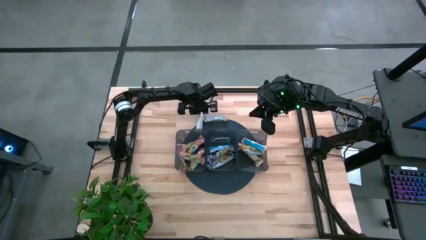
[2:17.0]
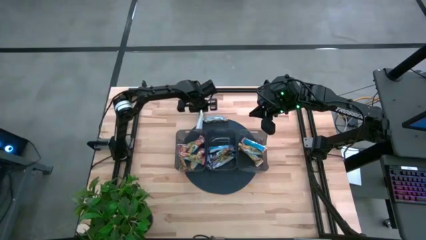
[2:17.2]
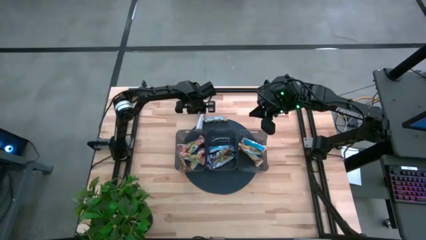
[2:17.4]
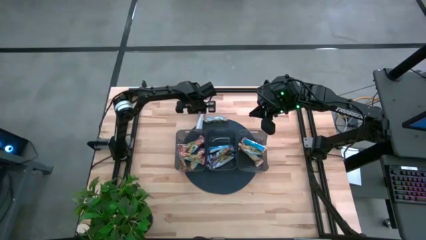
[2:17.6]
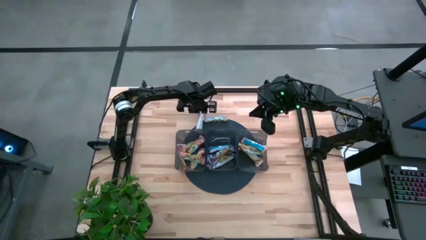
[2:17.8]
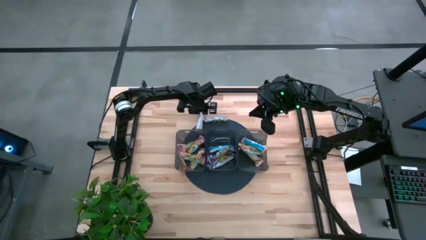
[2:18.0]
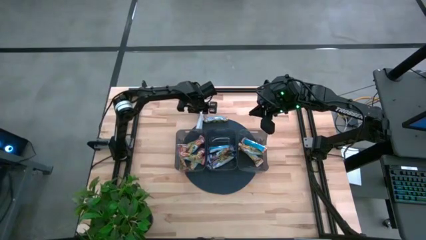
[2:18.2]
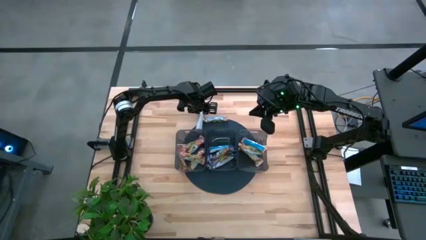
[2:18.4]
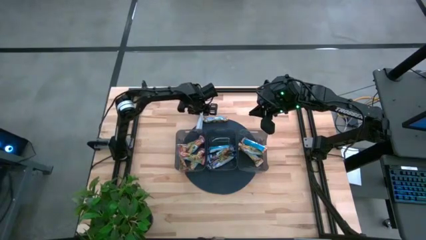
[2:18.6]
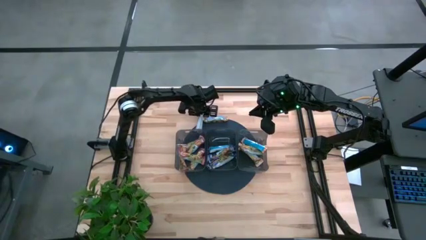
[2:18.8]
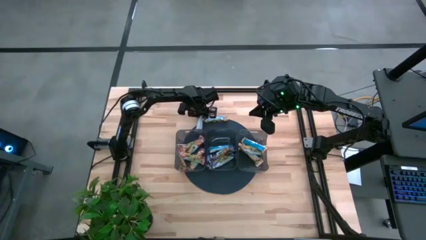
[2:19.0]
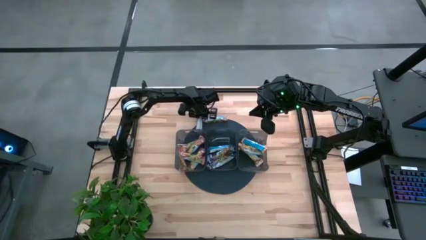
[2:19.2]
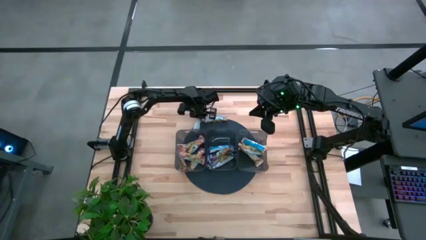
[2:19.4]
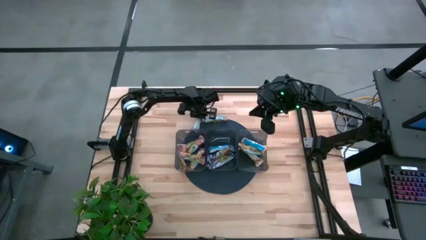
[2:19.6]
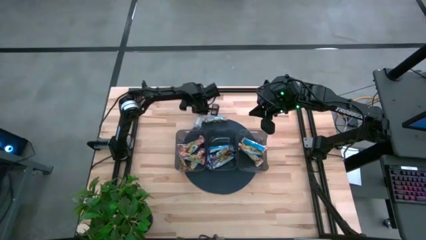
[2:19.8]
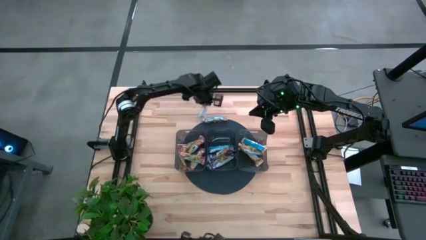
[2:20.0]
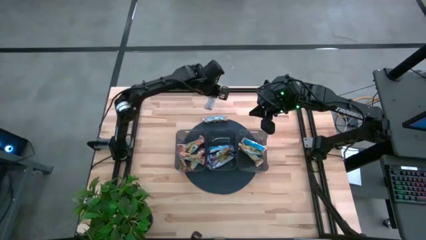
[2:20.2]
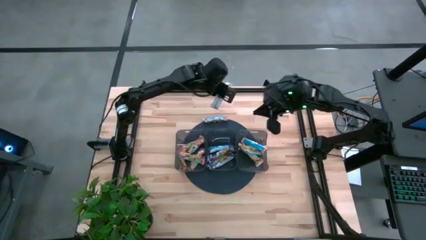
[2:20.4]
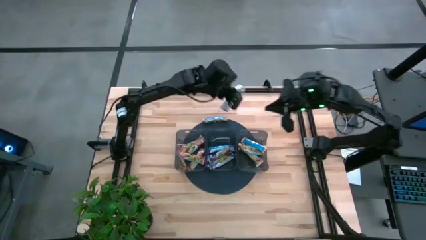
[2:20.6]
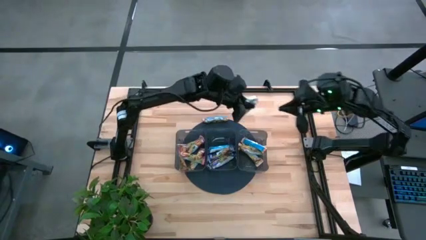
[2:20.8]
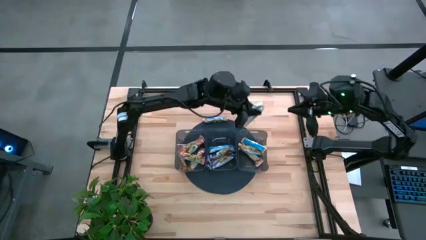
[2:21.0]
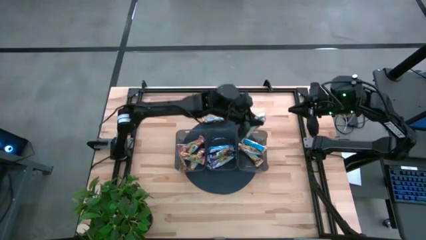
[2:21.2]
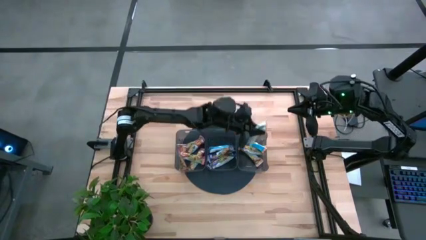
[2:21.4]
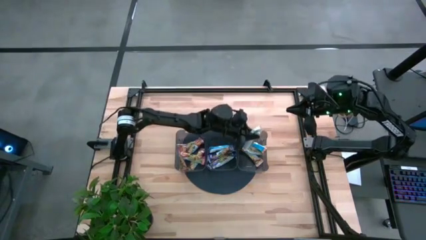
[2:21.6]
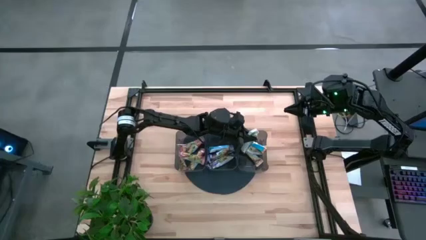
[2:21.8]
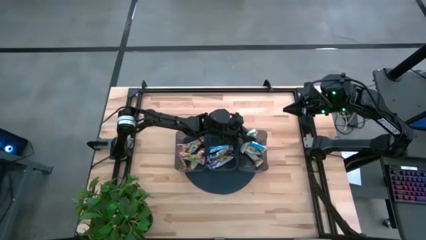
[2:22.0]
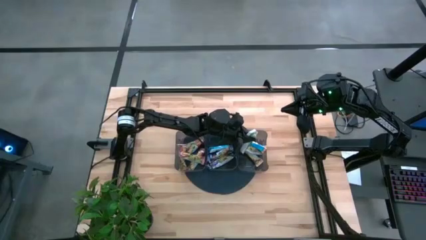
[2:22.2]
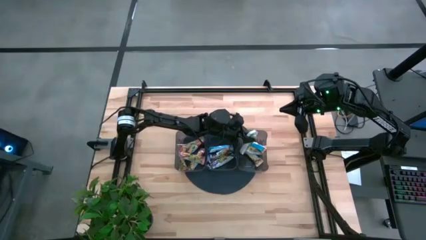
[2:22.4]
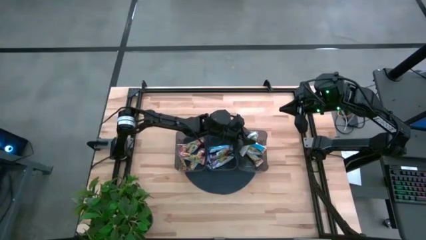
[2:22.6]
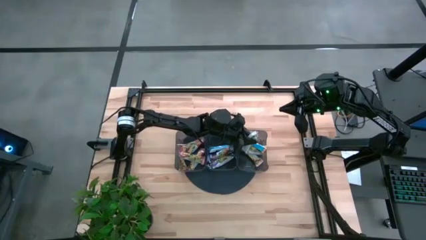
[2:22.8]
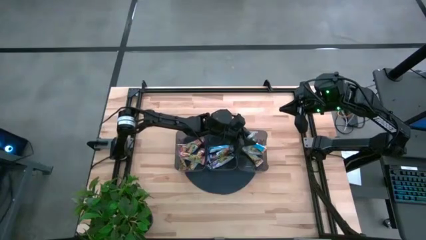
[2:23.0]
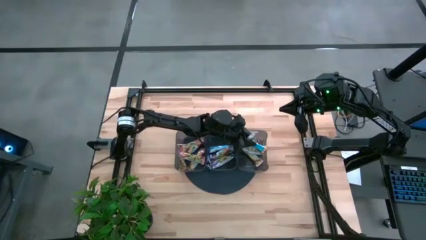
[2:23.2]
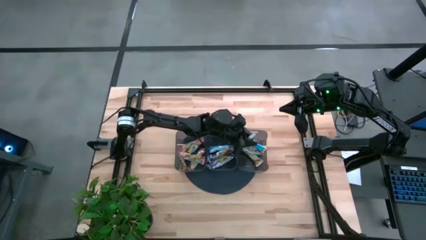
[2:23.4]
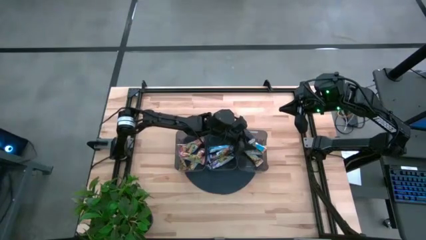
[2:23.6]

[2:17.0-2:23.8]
Task: Pick and place Granola Bars by type
Put the yellow granola bar into the right black bin

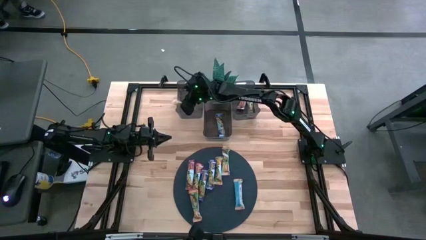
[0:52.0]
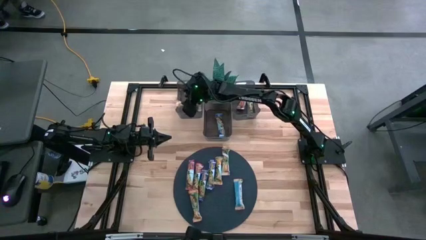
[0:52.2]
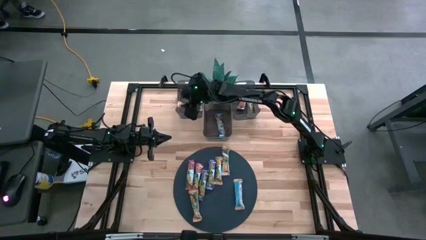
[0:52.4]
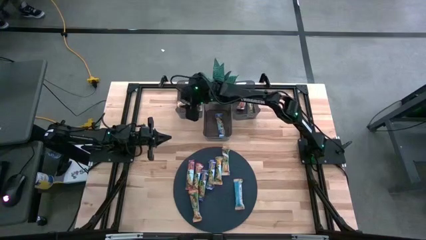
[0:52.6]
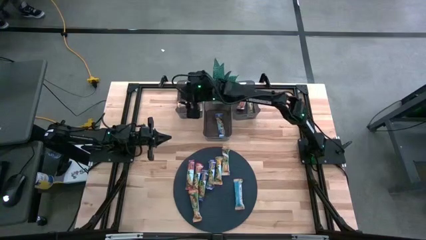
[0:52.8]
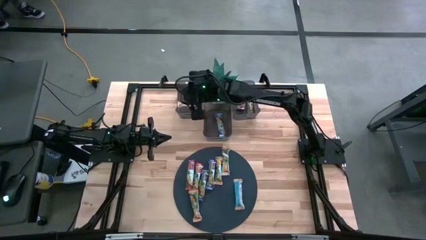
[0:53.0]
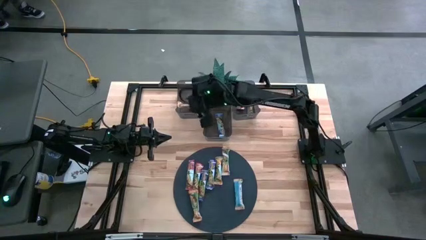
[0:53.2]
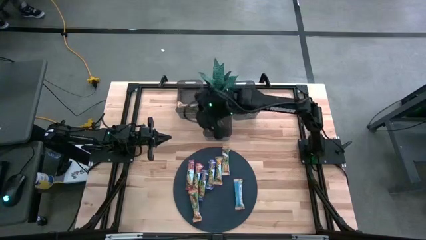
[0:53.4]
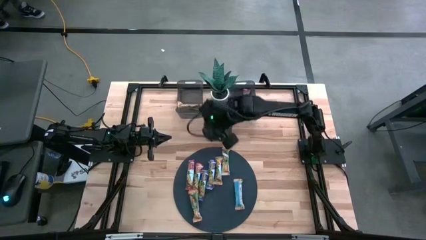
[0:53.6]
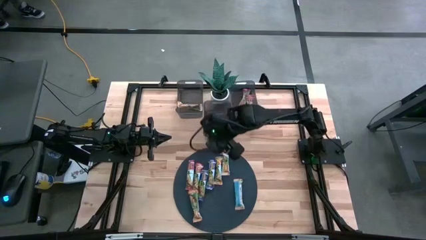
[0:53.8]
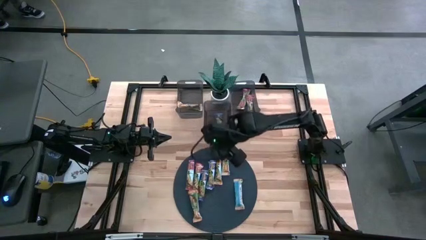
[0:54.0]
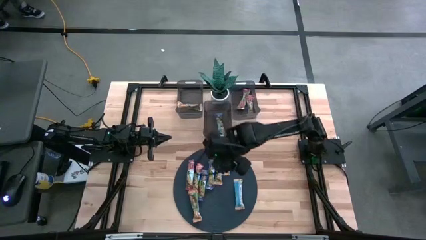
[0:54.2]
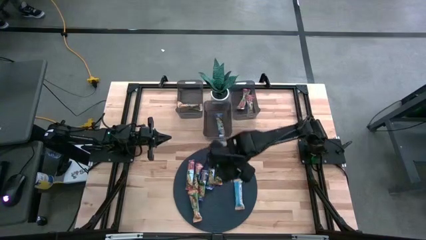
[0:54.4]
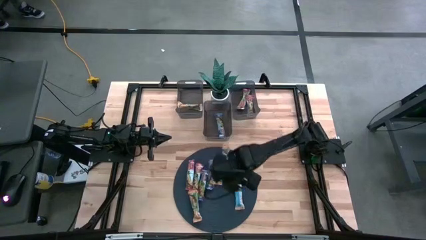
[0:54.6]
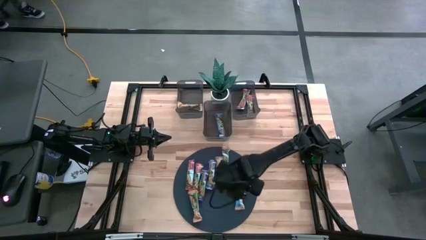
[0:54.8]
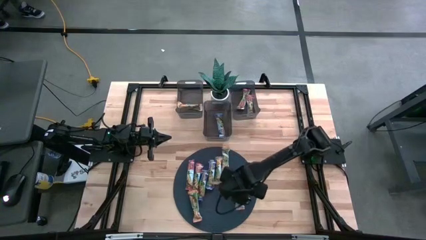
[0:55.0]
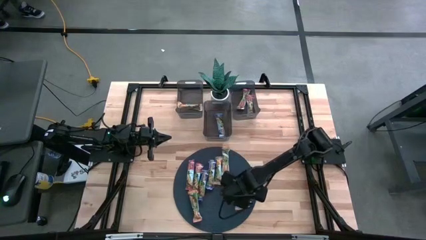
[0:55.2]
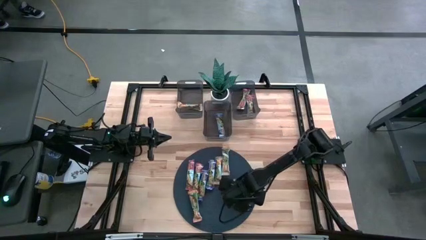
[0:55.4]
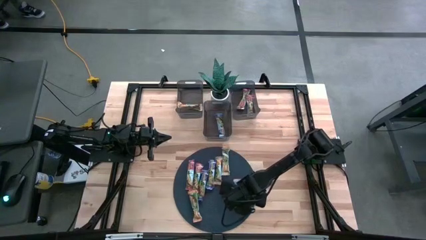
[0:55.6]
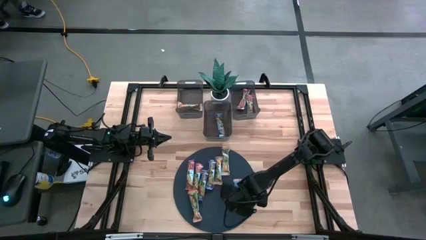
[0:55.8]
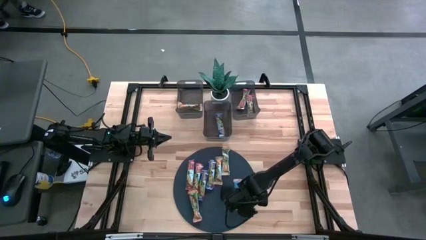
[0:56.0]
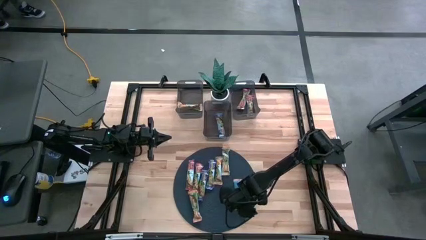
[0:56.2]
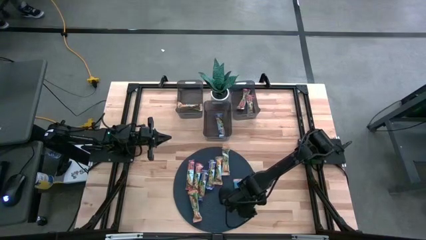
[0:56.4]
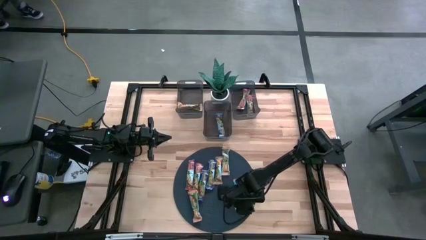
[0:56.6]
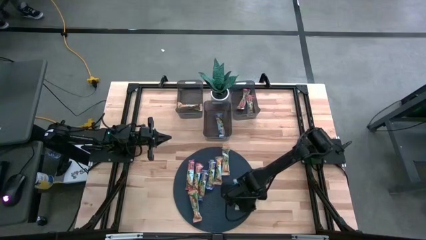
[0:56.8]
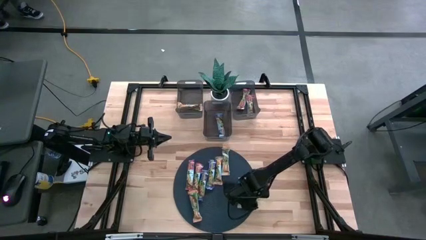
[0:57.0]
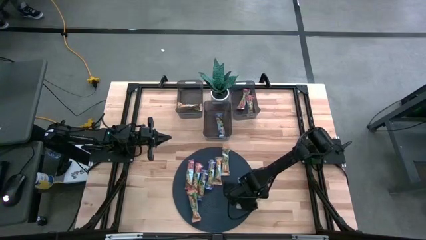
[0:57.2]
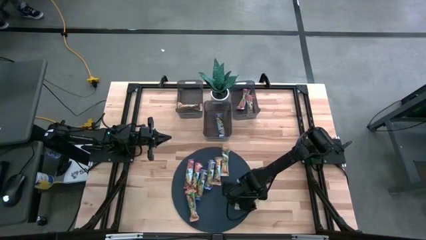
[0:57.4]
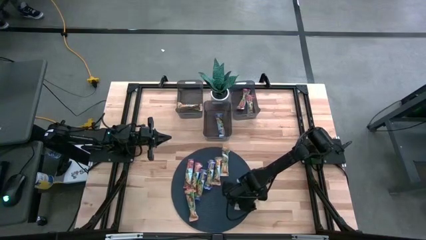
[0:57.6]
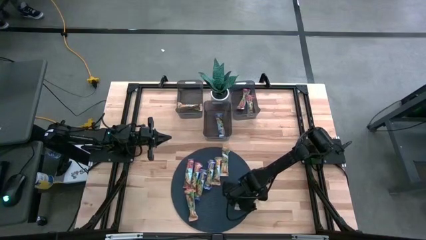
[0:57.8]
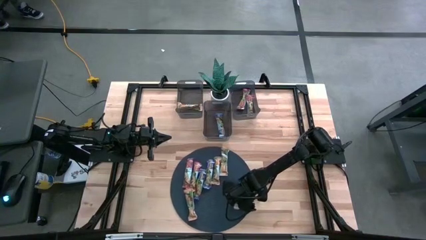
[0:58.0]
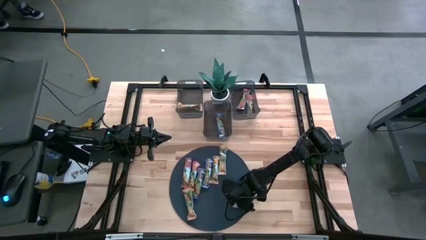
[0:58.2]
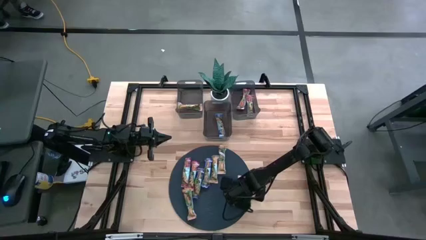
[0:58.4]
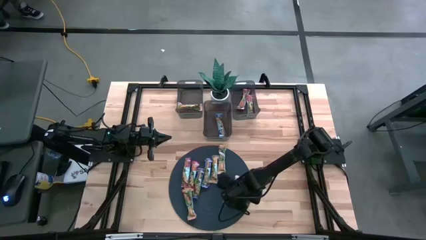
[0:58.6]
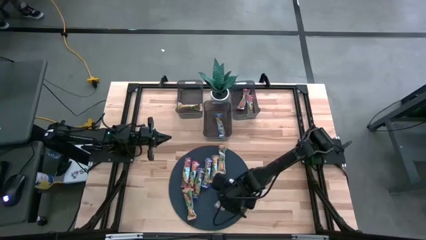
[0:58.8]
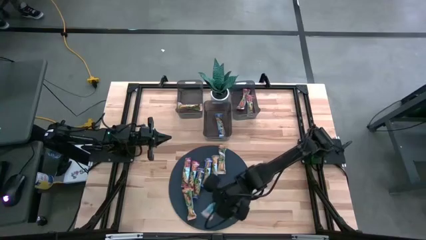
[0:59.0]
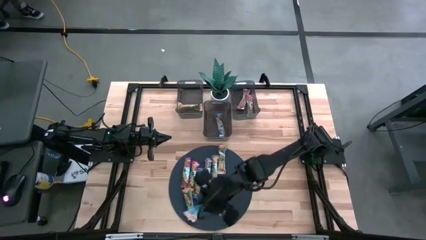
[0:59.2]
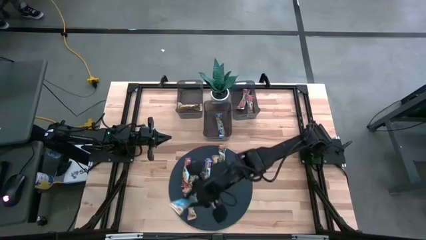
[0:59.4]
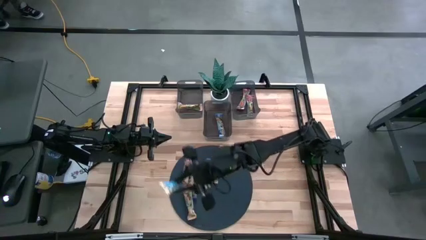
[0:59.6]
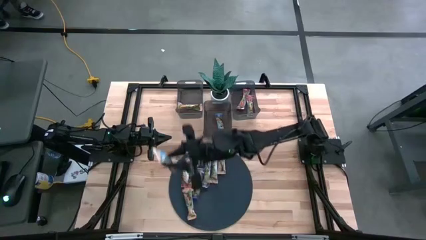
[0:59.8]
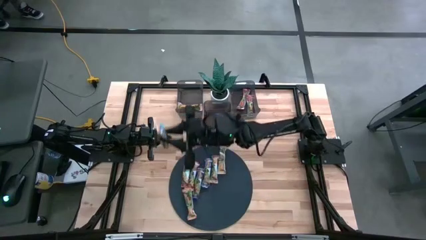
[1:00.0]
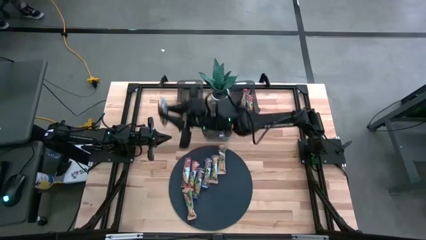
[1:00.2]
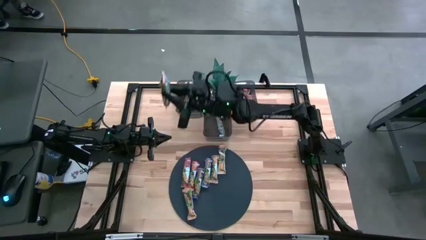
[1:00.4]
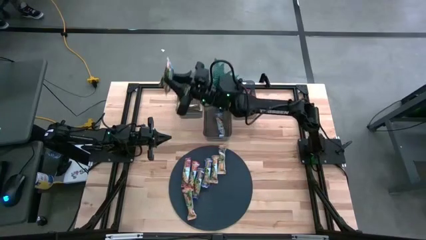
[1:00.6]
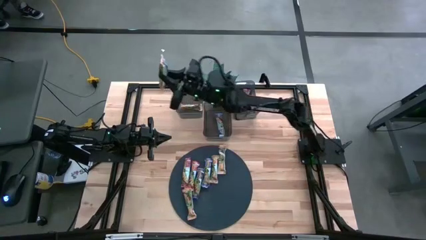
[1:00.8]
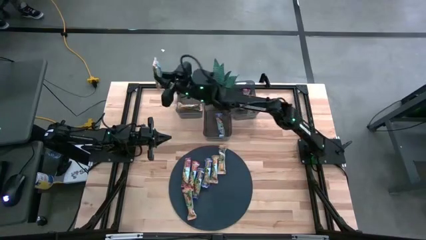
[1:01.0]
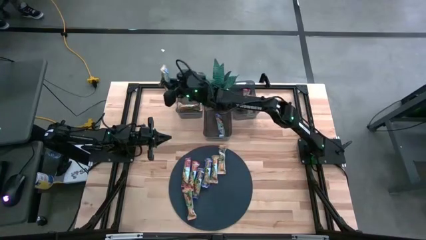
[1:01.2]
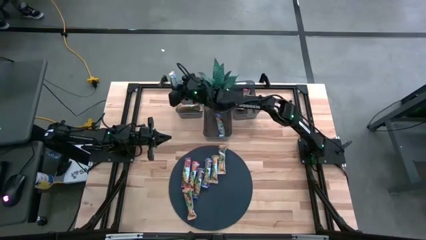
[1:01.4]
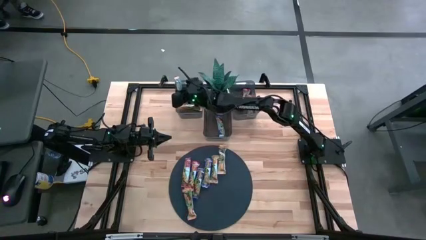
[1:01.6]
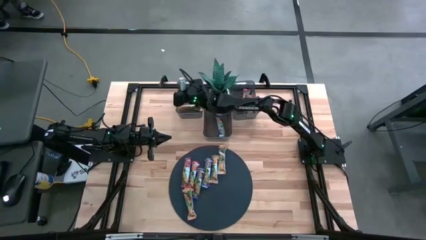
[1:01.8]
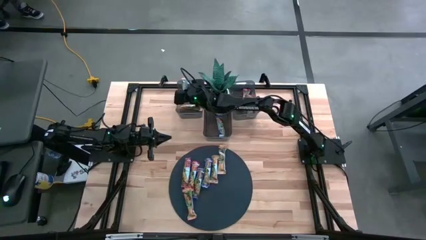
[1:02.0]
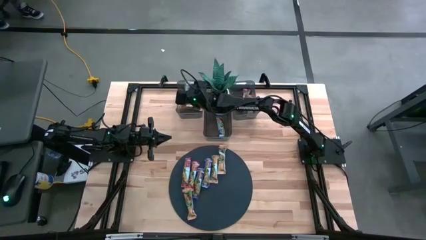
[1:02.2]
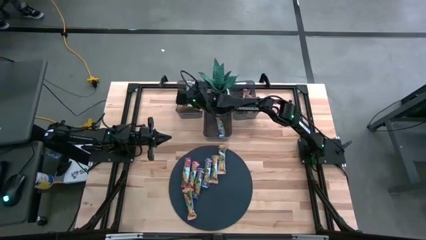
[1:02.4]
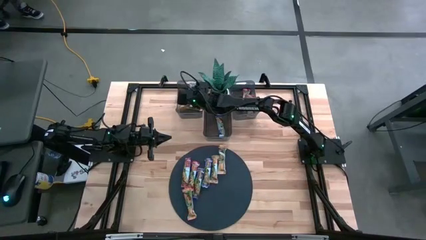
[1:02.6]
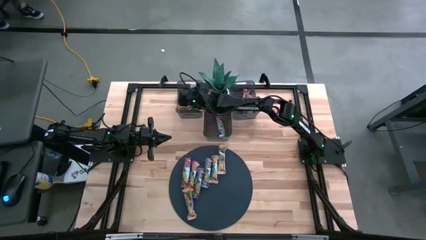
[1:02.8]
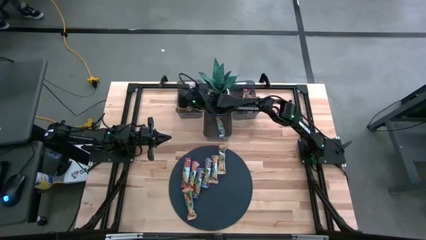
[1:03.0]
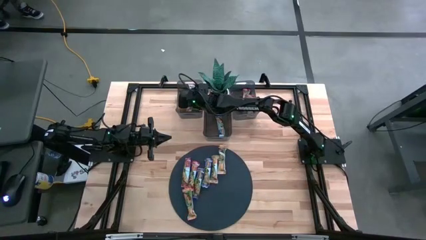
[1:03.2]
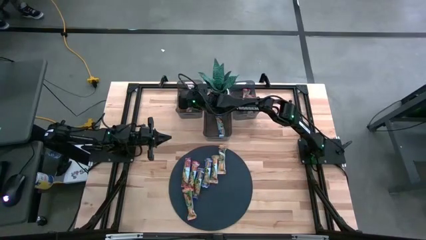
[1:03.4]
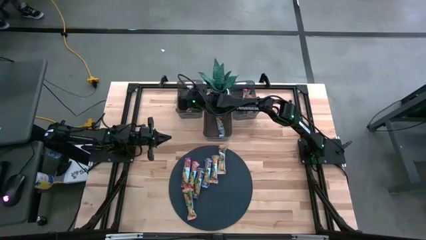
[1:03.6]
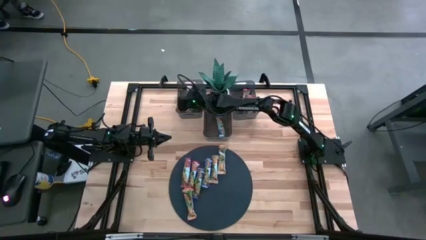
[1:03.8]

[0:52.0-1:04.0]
Task: Pick and place Granola Bars by type
Put the yellow granola bar into the left black bin
